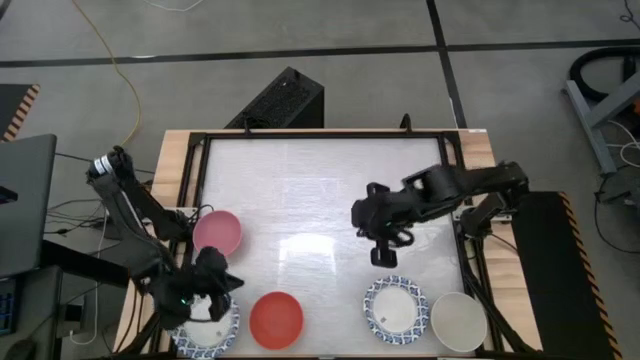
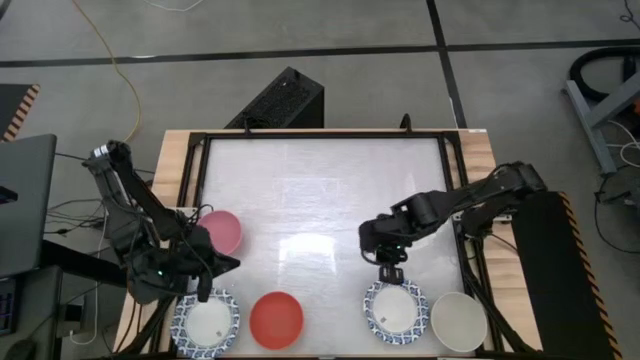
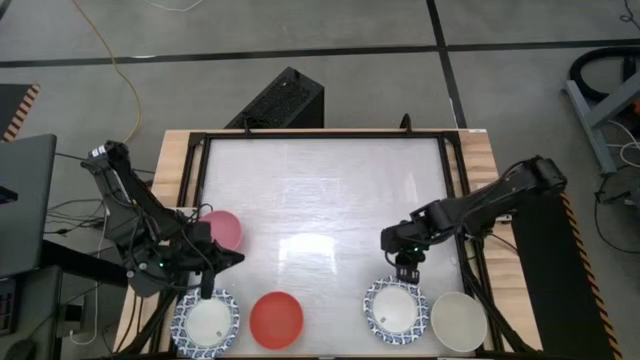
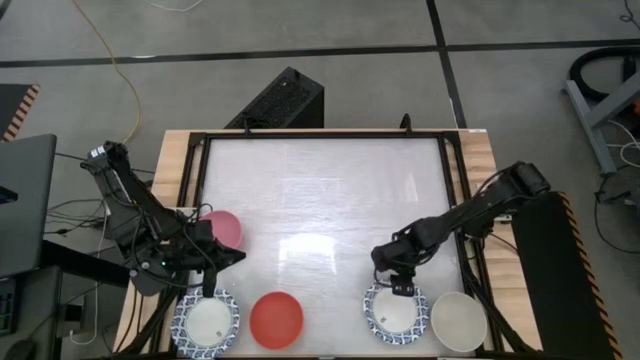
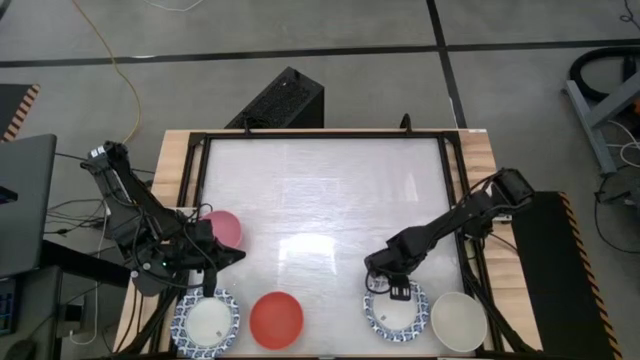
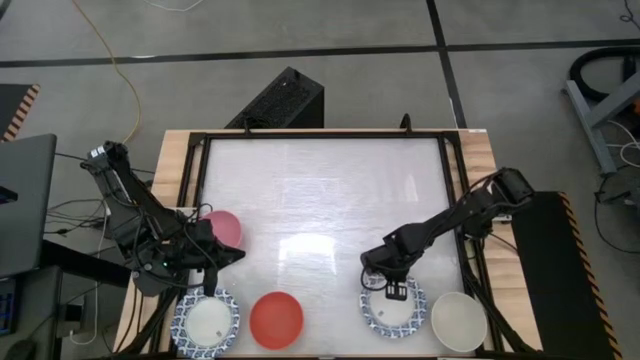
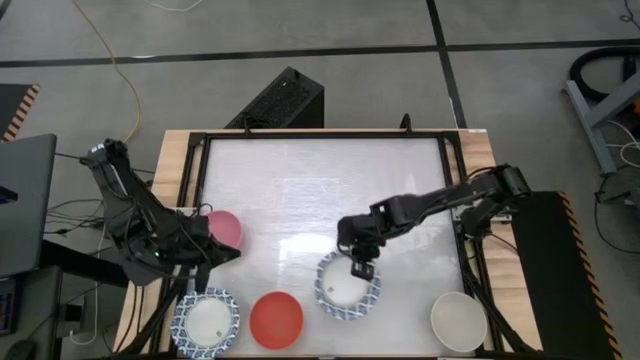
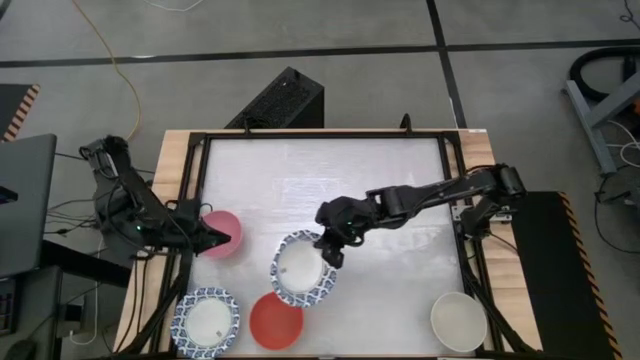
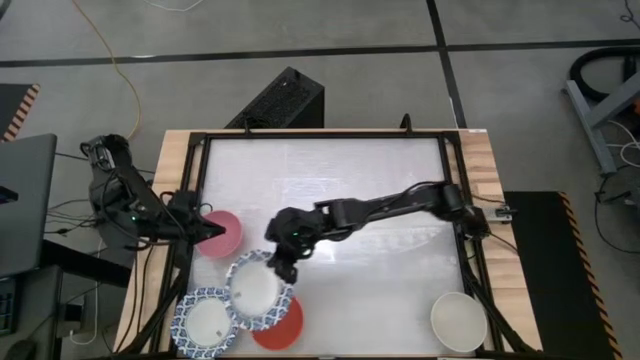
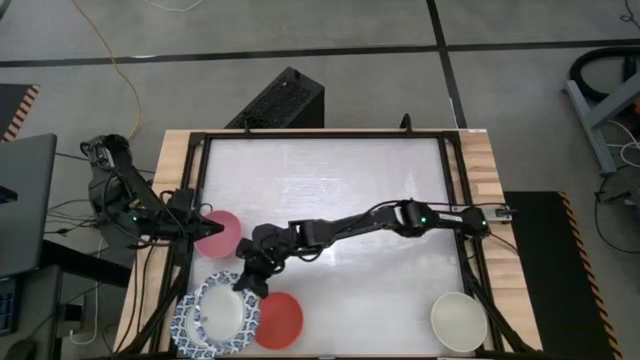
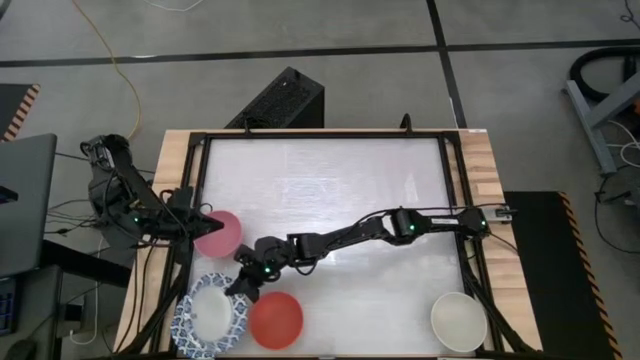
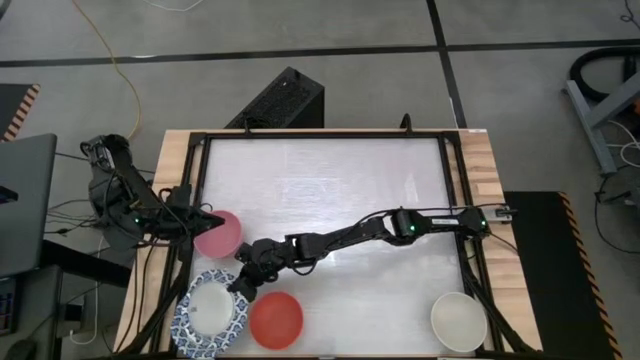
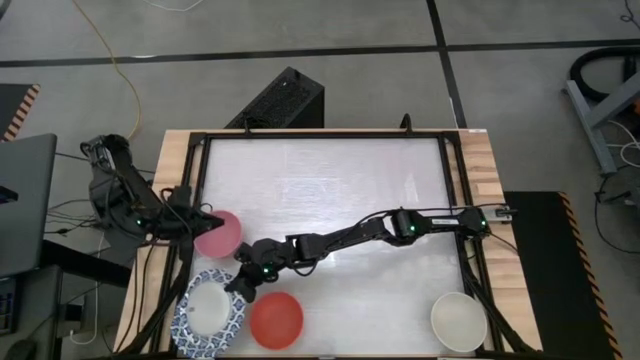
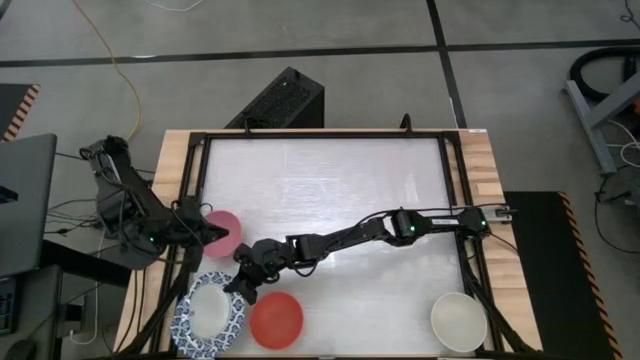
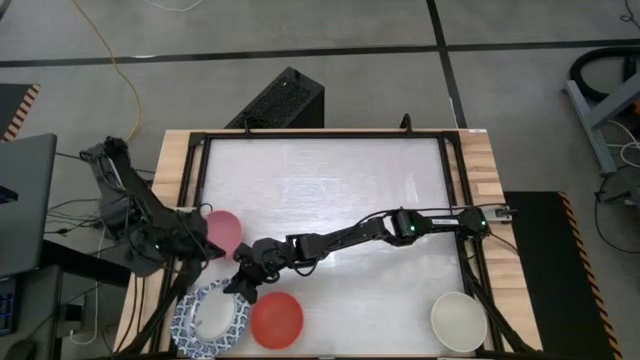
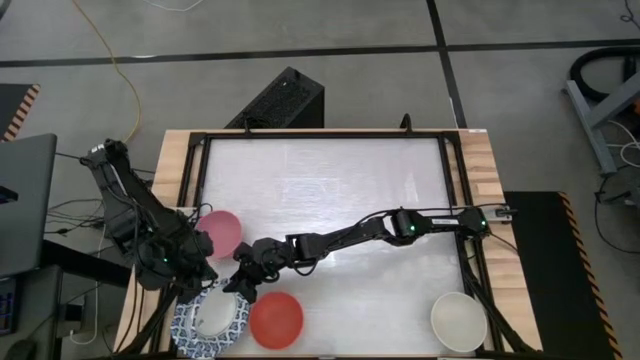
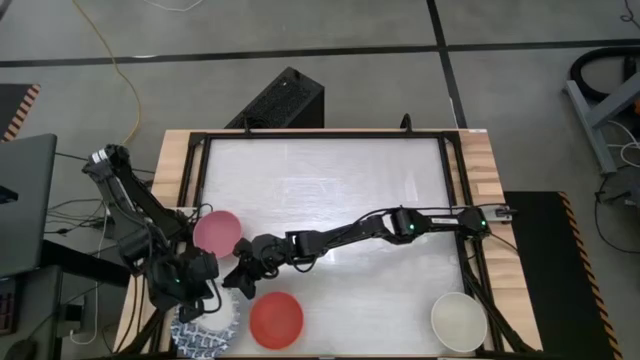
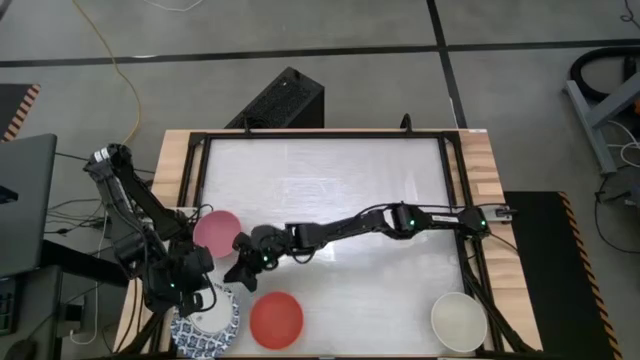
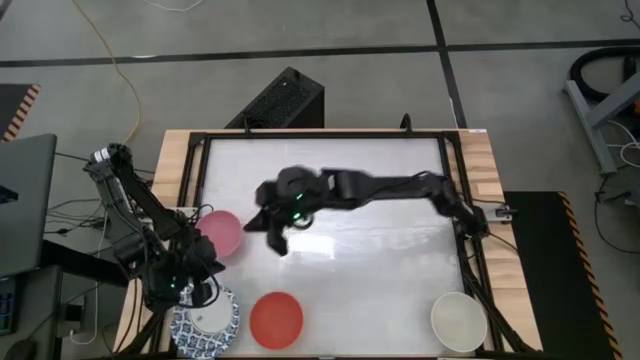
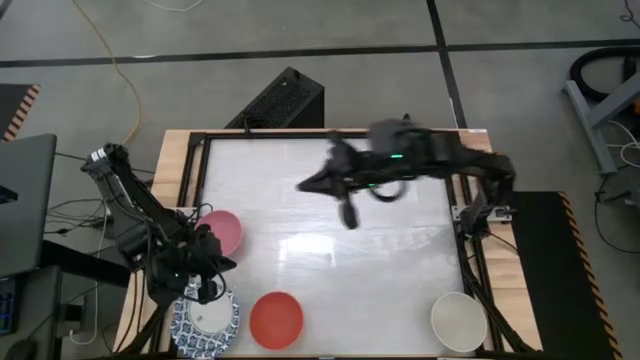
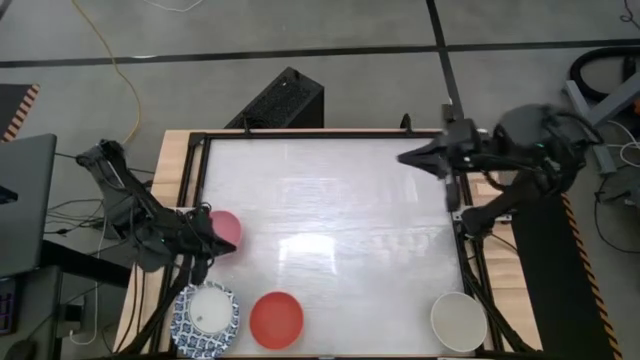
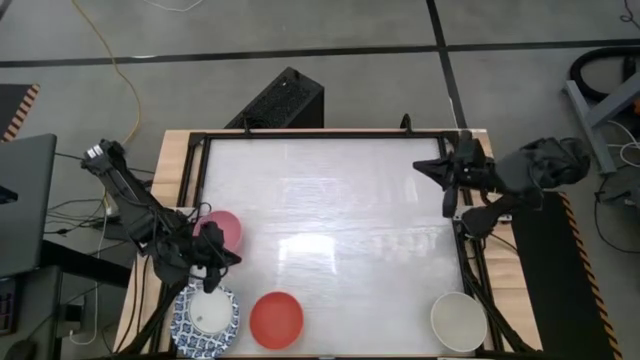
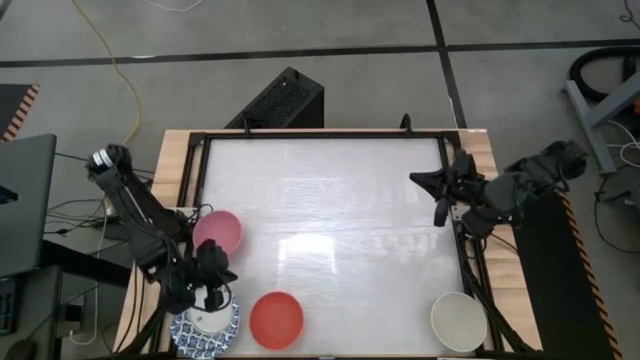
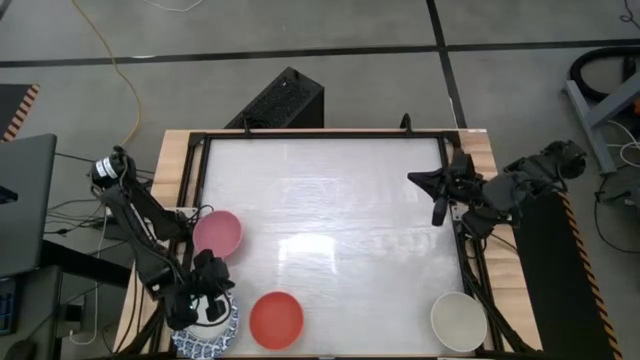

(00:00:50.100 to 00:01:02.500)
Task: Nest bowls inside each other by size order
Stack the white bowl onto the stacked white bowls

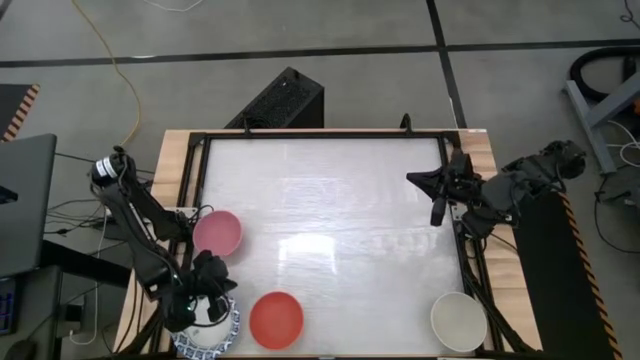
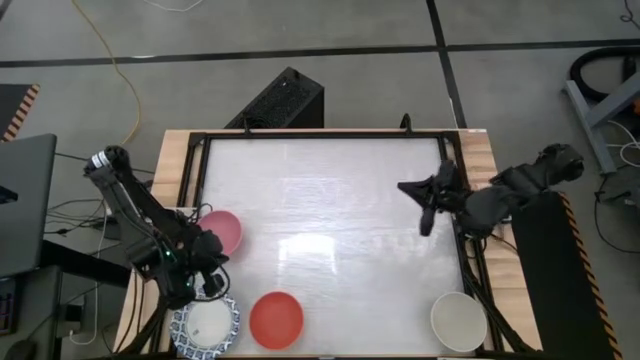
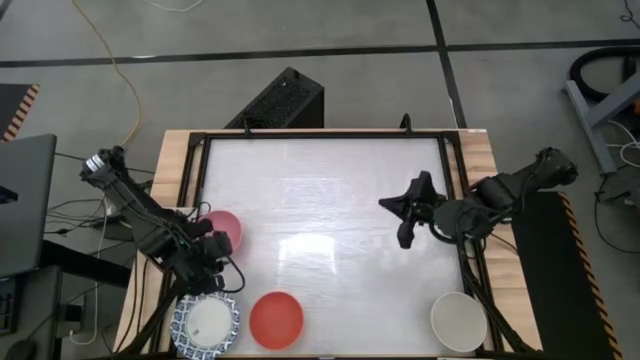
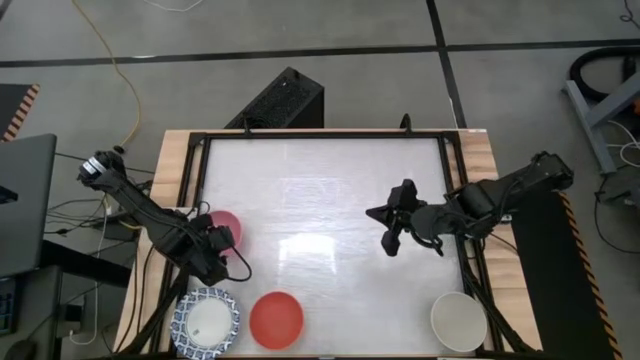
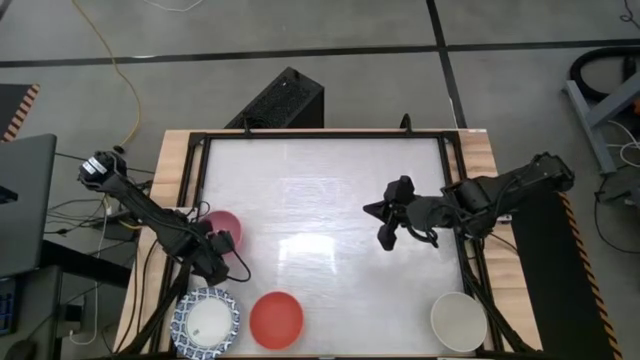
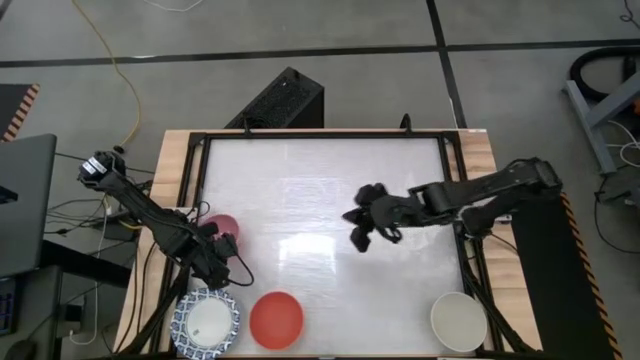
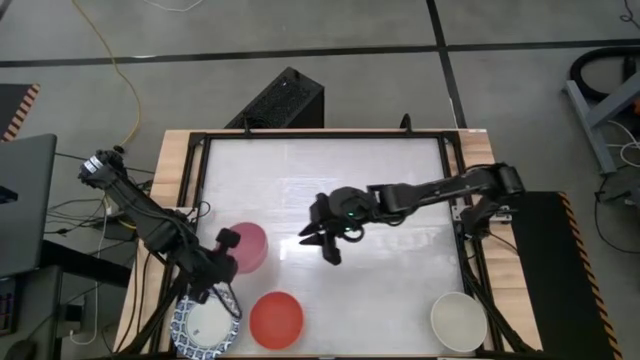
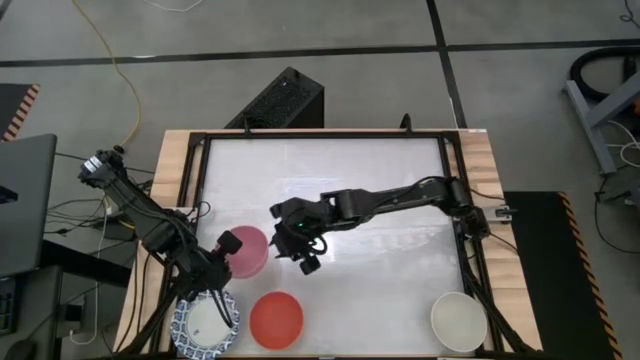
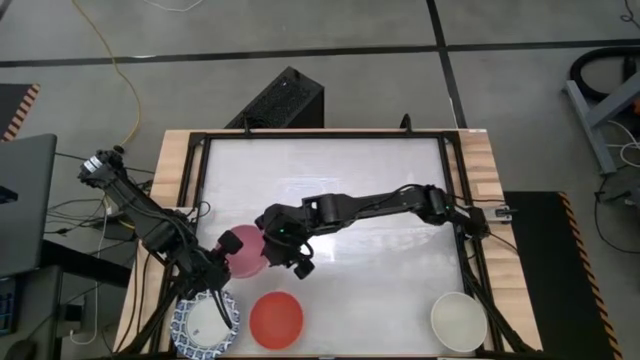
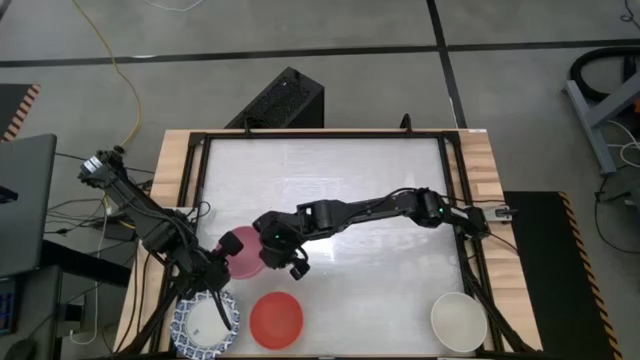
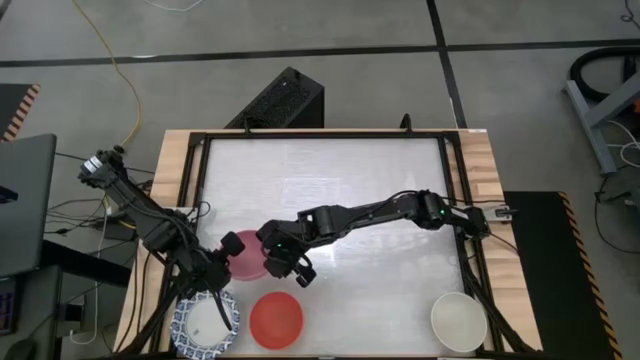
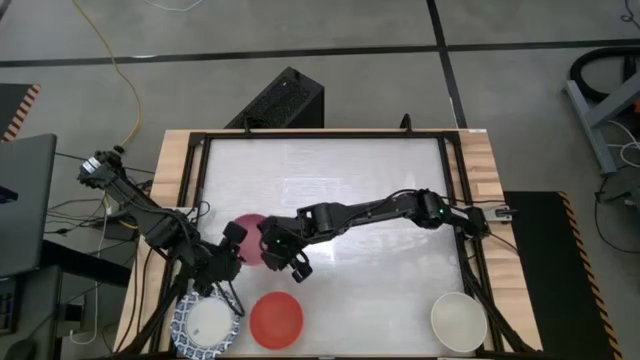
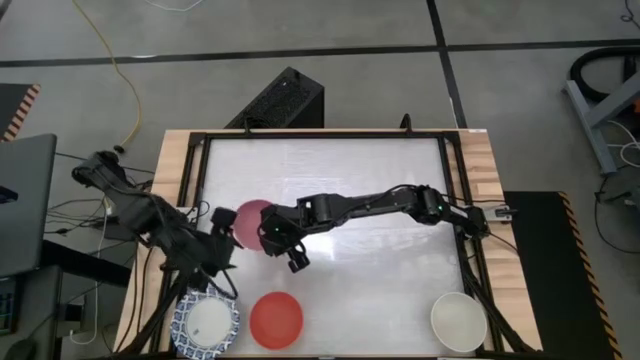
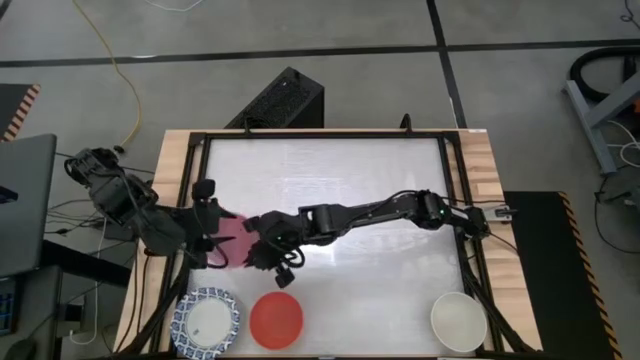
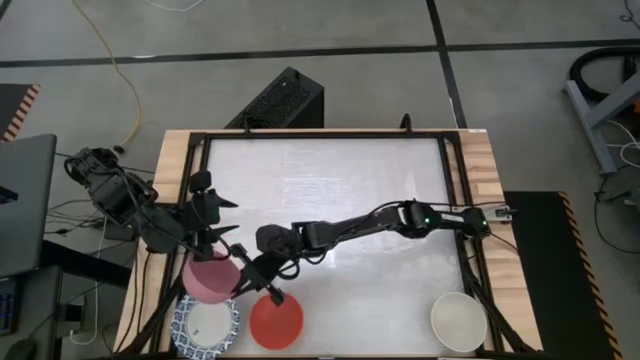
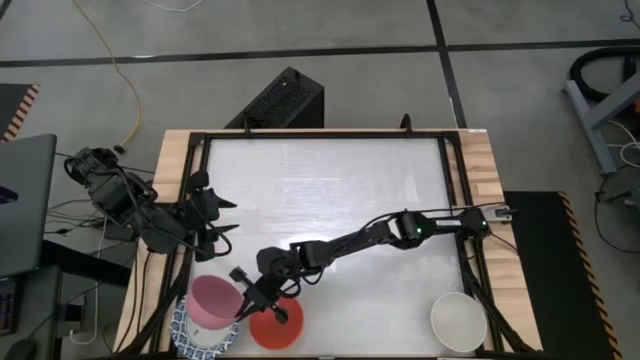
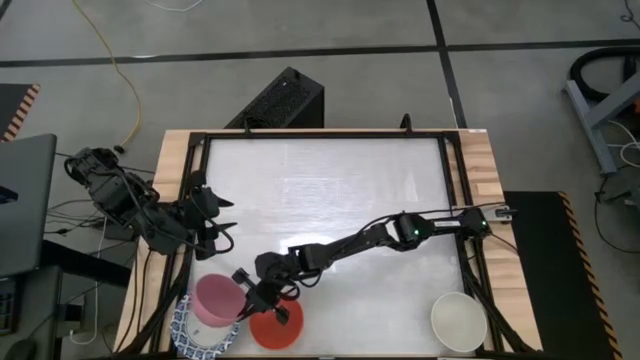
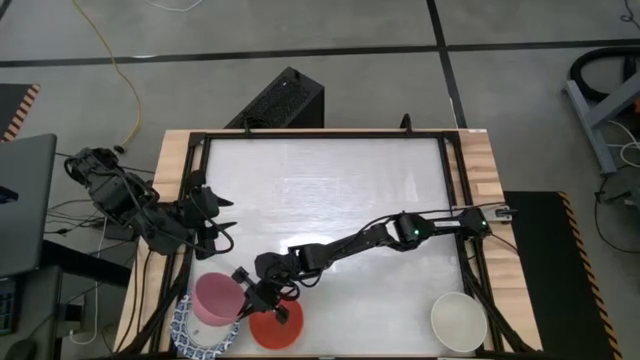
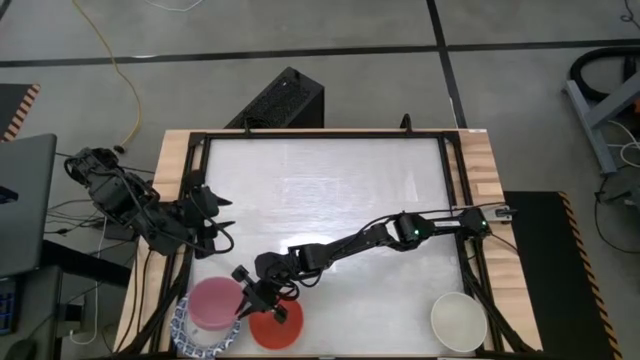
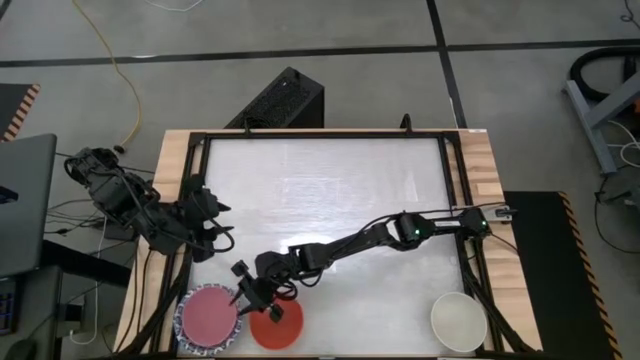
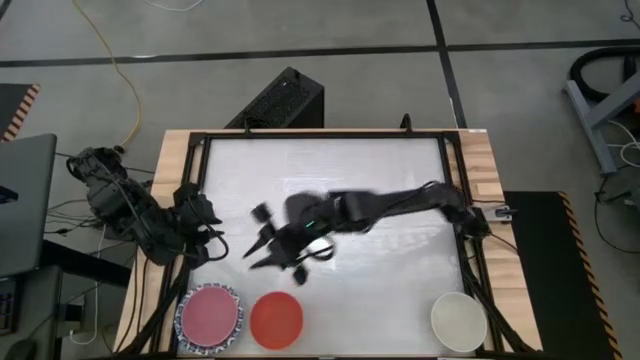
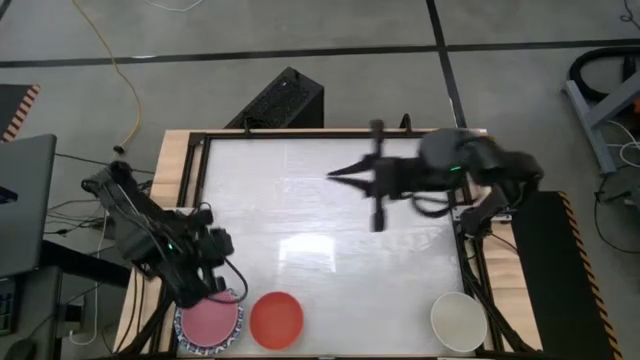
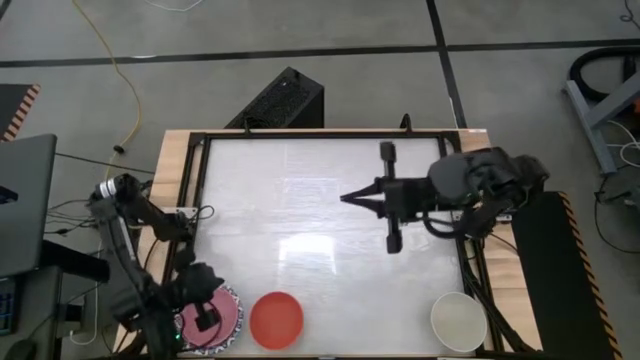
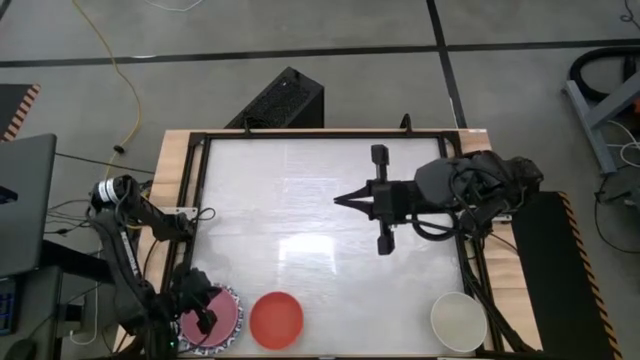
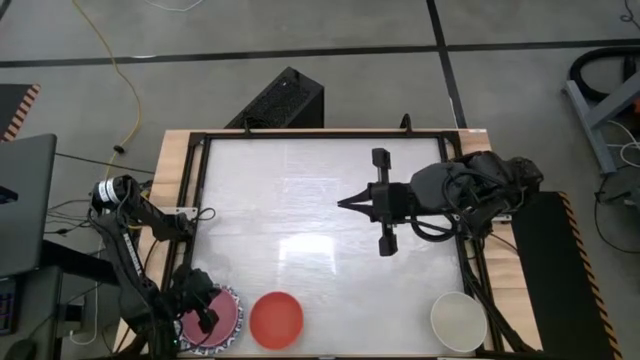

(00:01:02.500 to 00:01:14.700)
Stack the pink bowl onto the stacked white bowls
